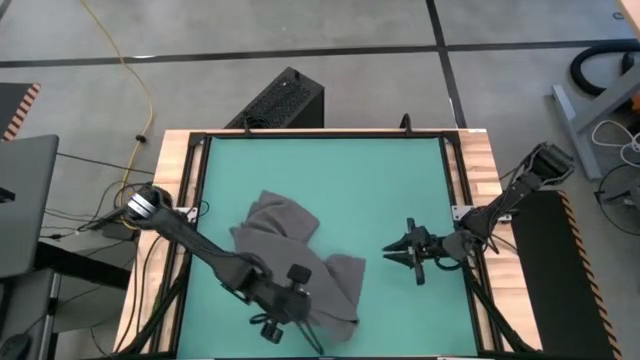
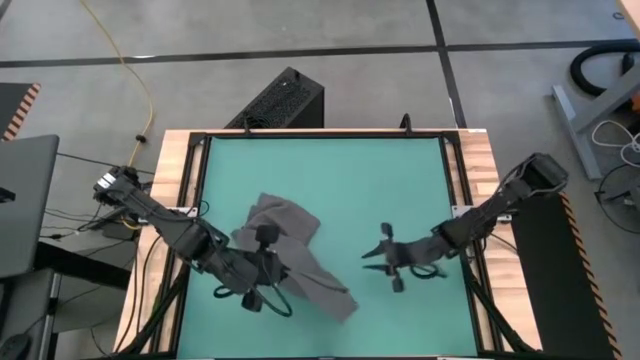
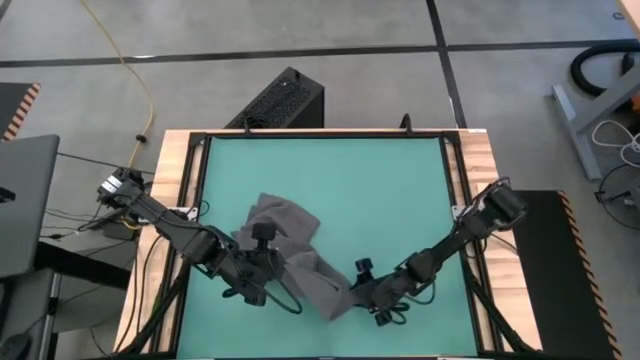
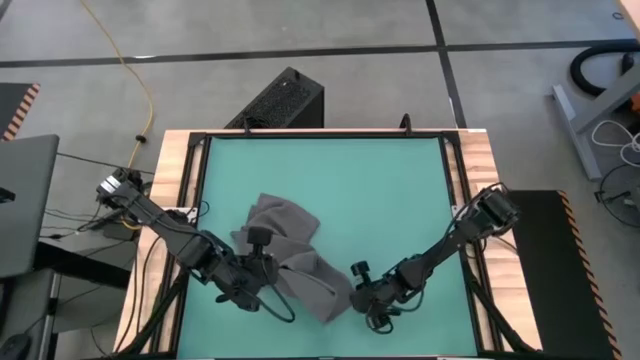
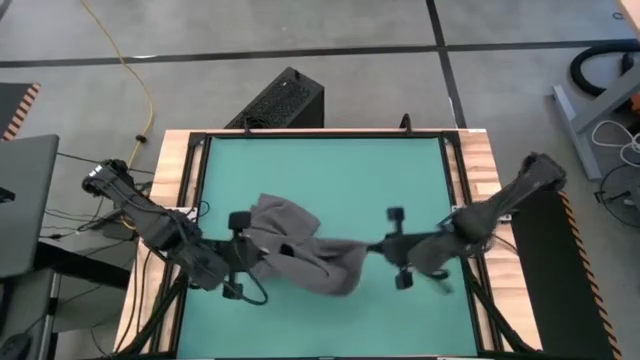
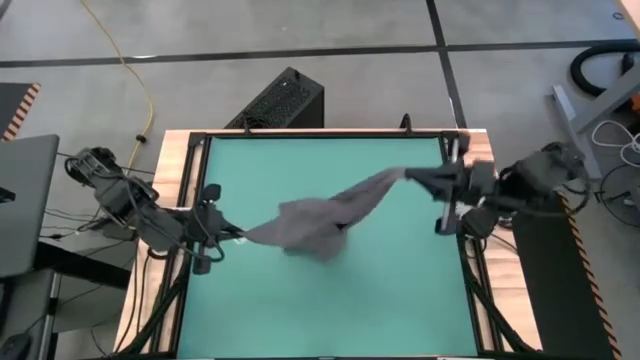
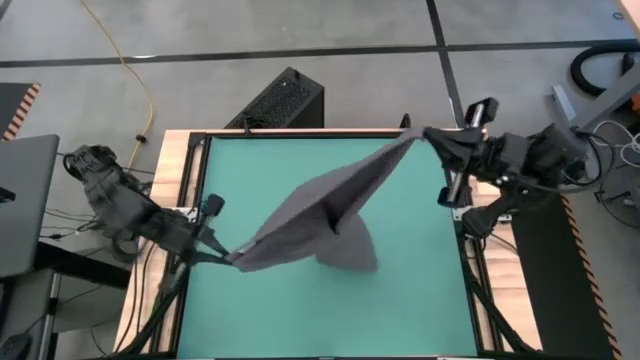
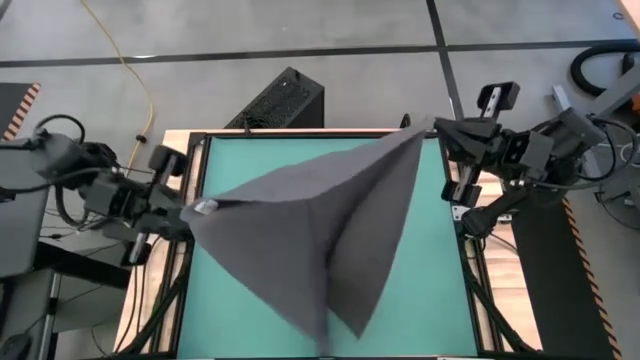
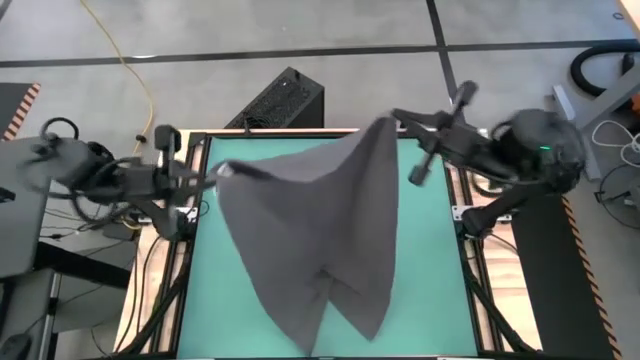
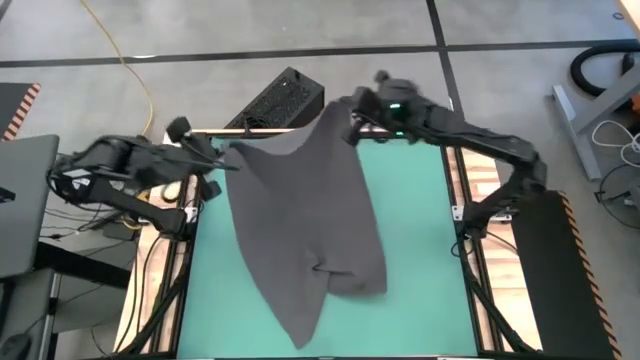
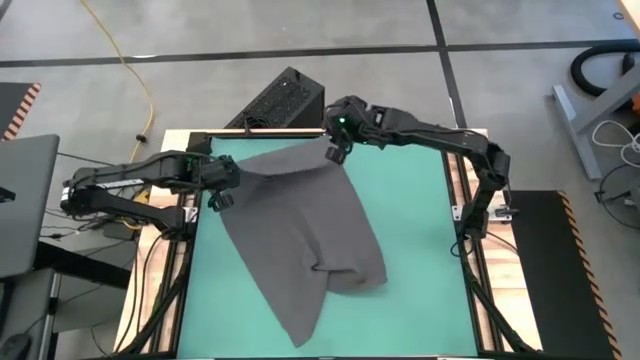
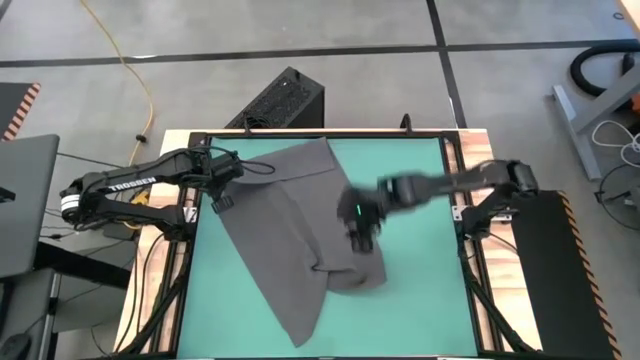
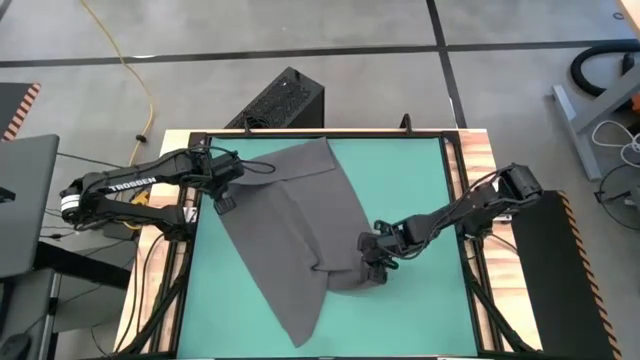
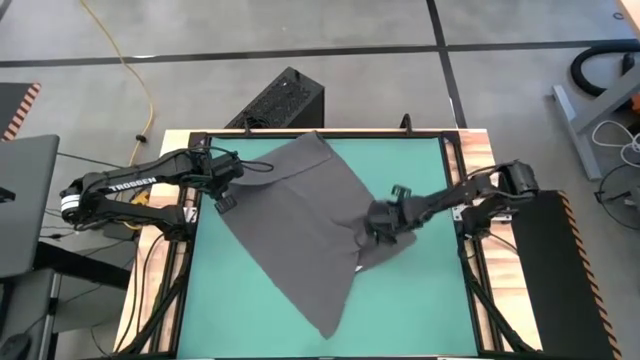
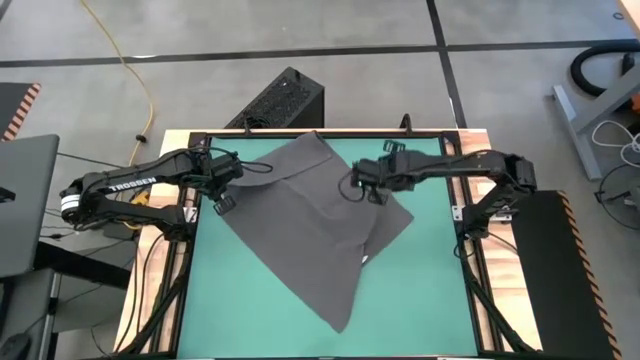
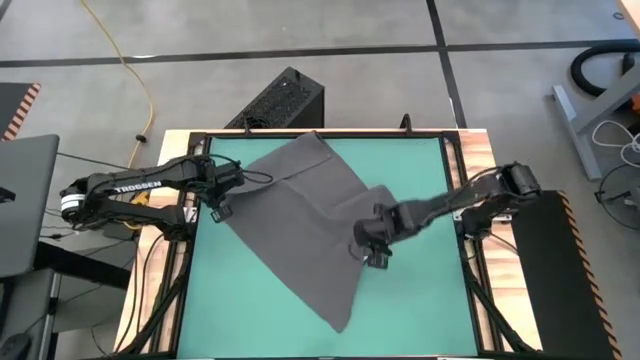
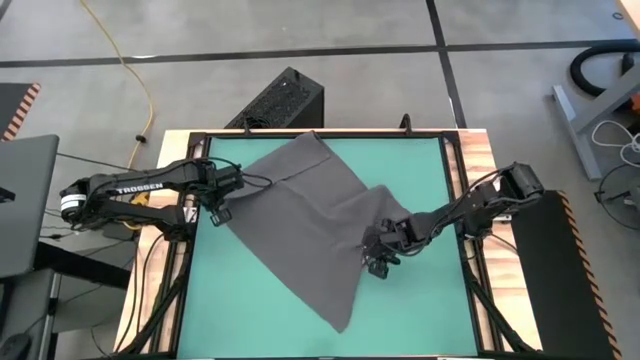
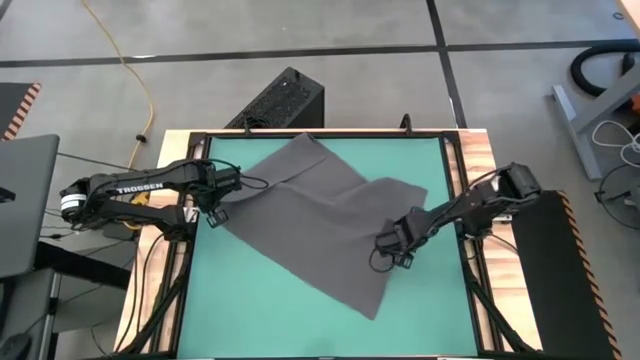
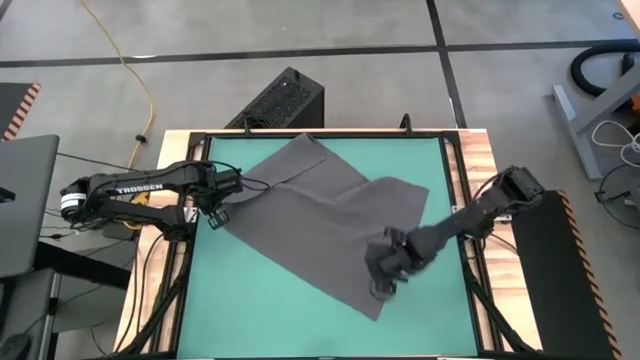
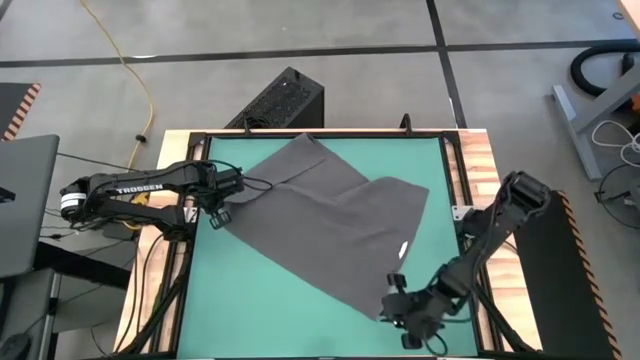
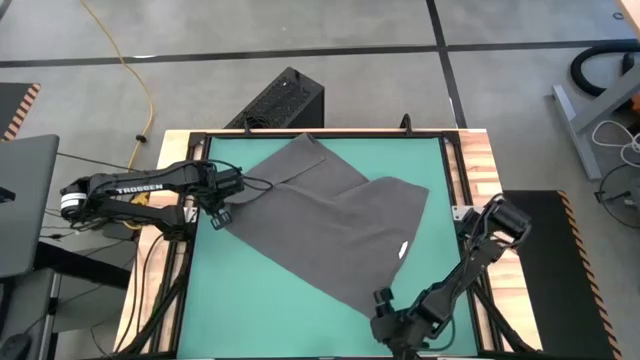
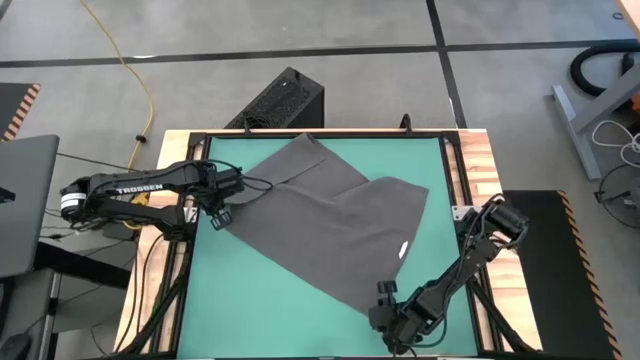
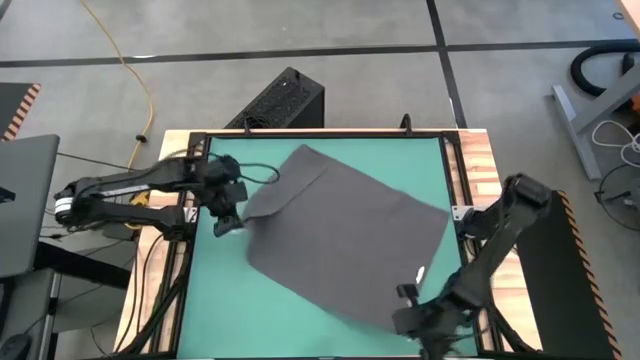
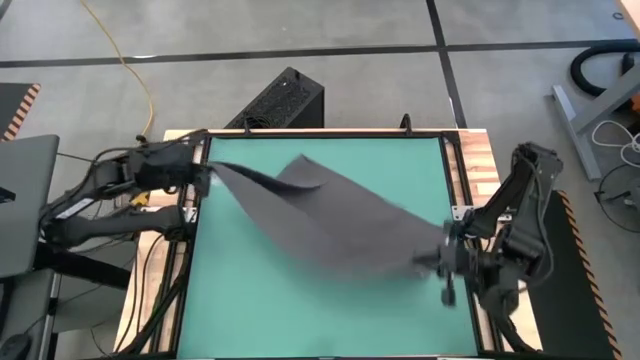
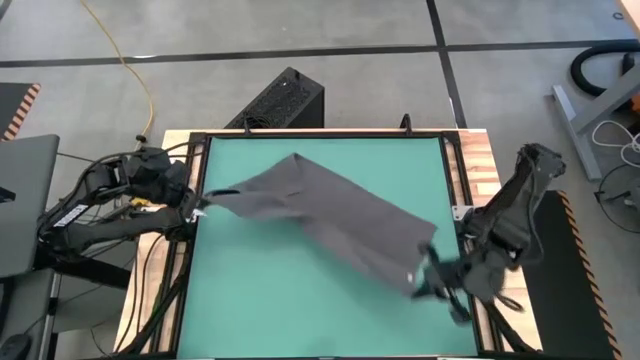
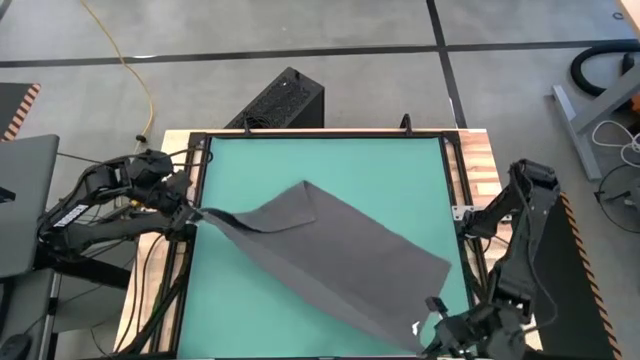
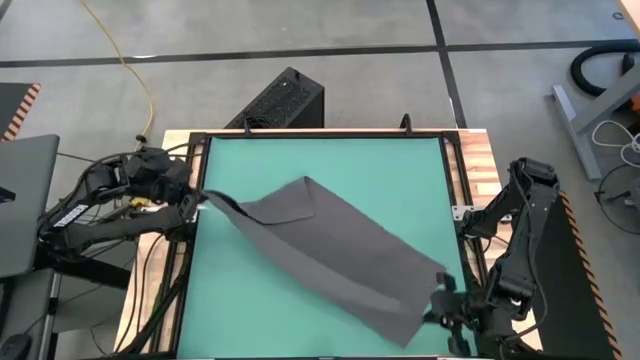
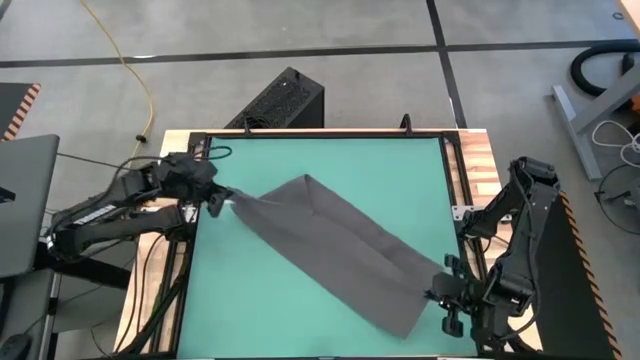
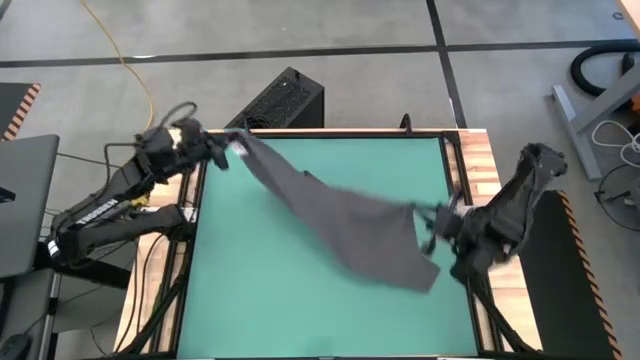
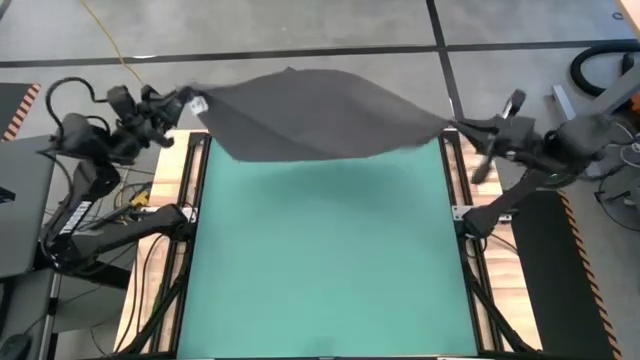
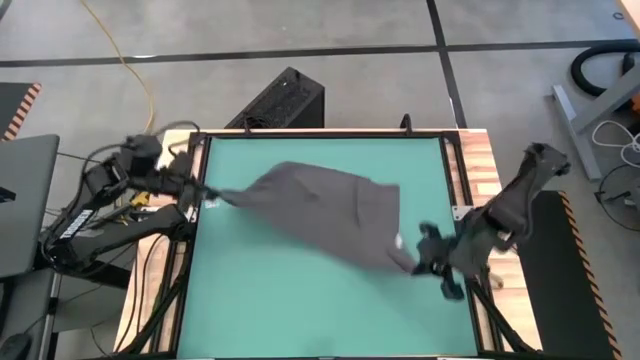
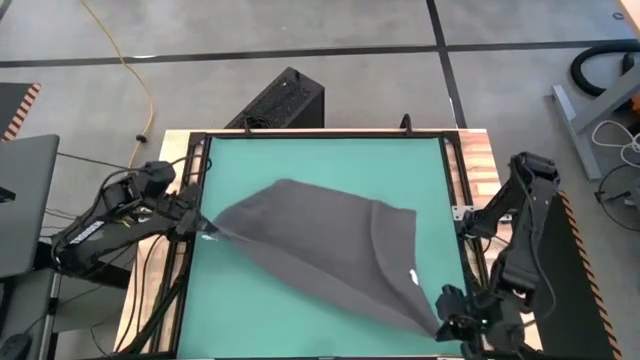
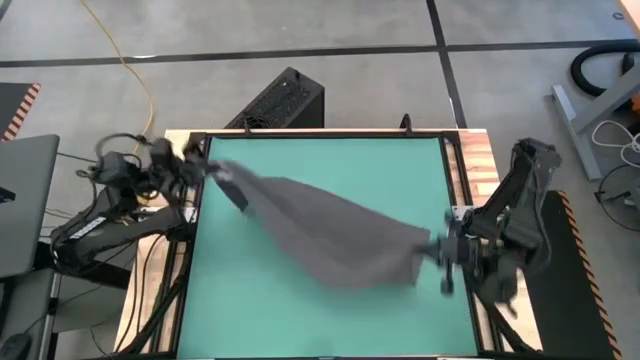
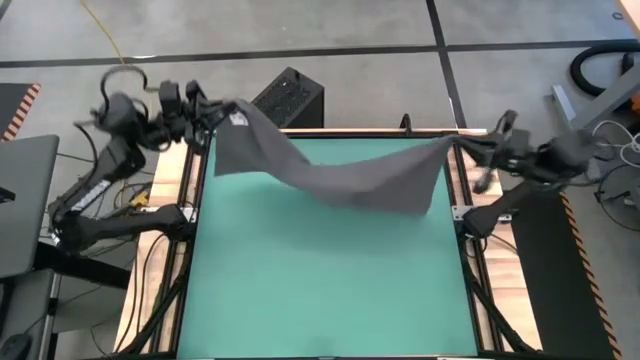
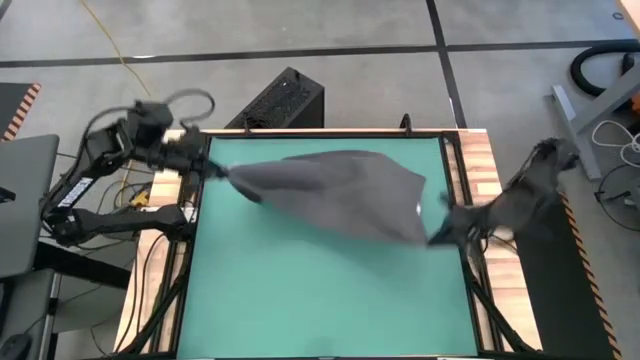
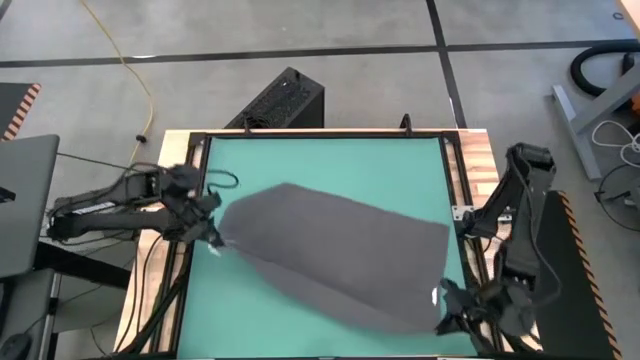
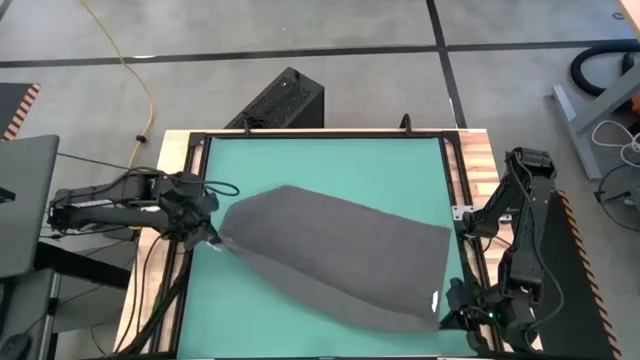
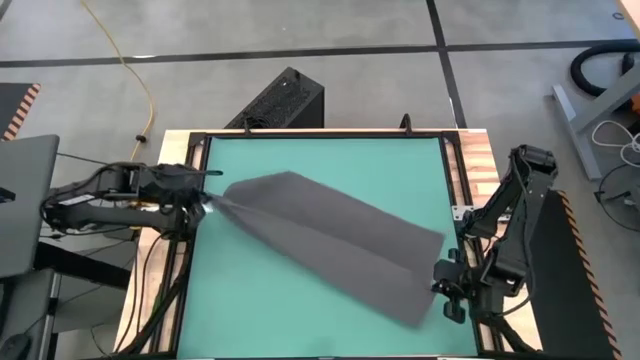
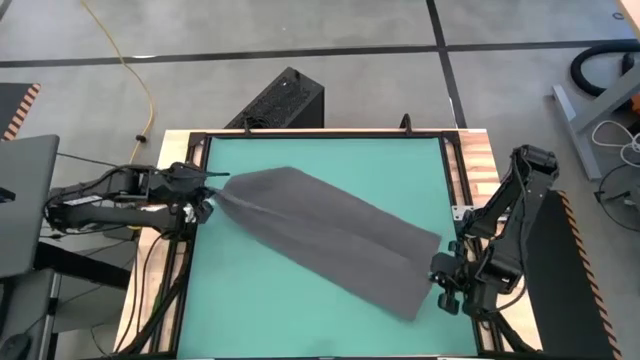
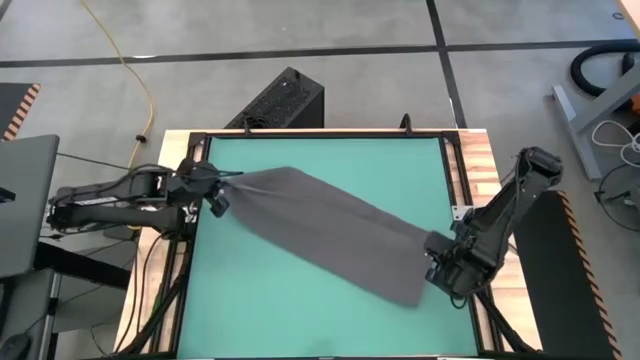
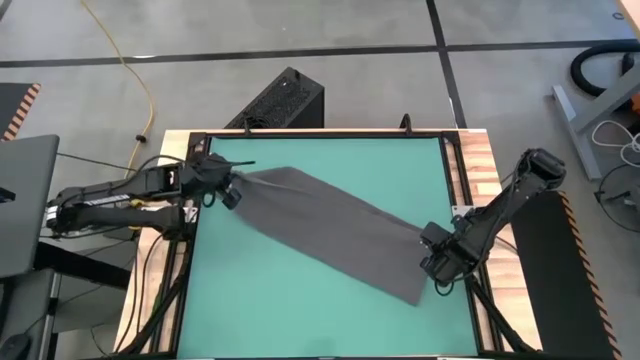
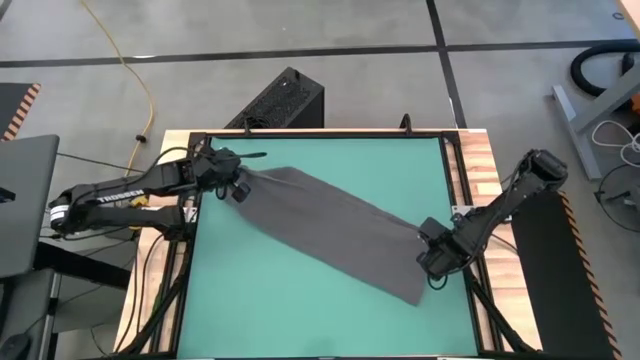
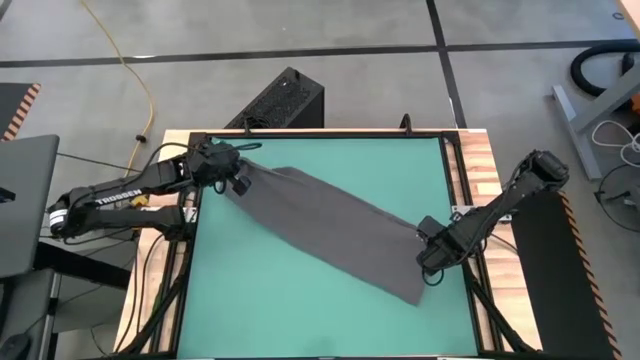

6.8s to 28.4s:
Task: Roll towel
Roll the gray towel
